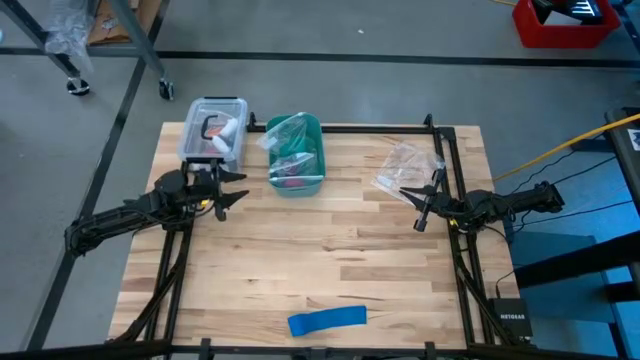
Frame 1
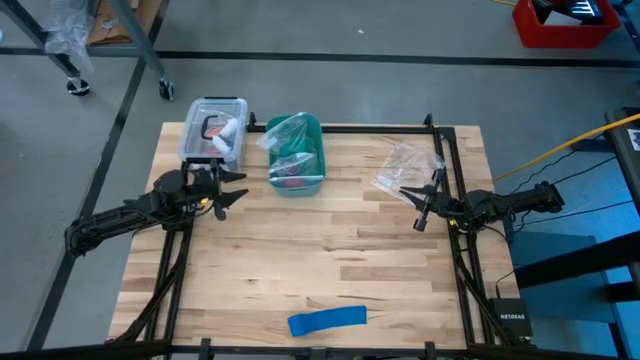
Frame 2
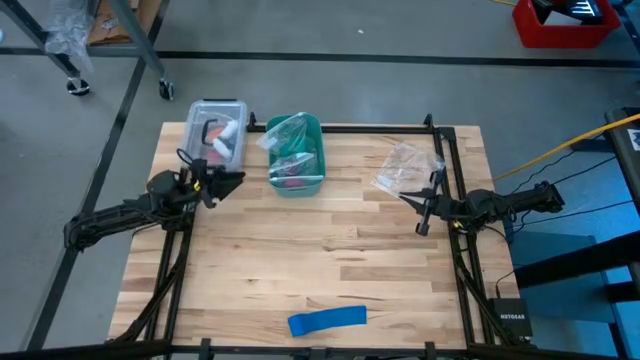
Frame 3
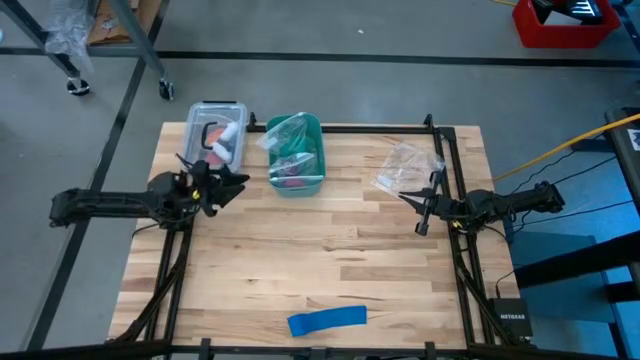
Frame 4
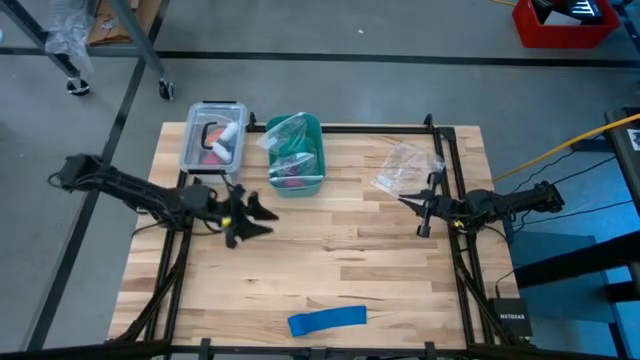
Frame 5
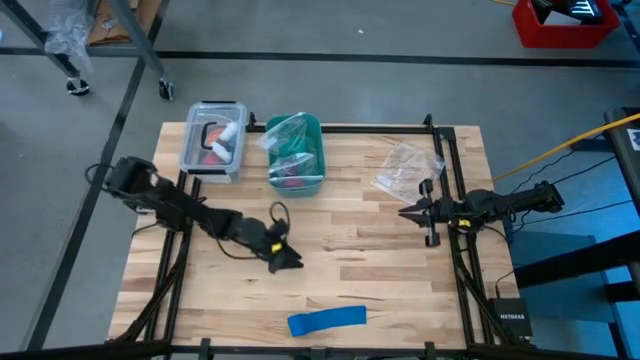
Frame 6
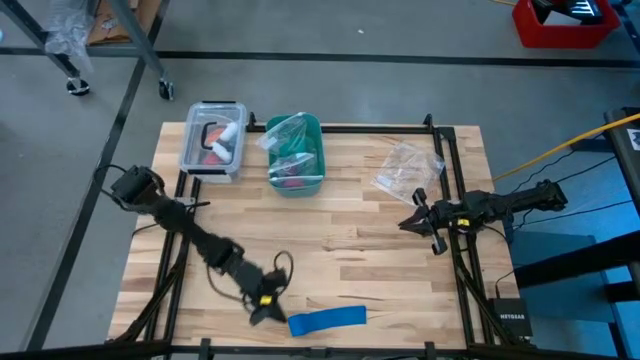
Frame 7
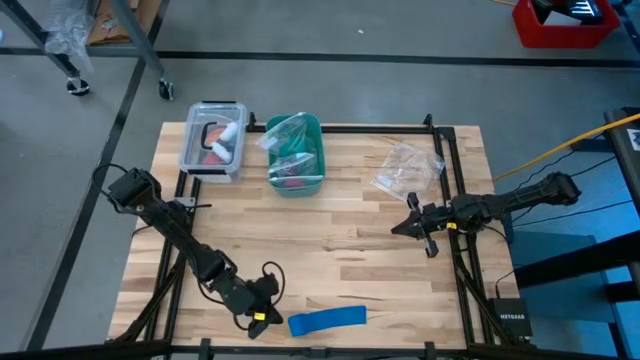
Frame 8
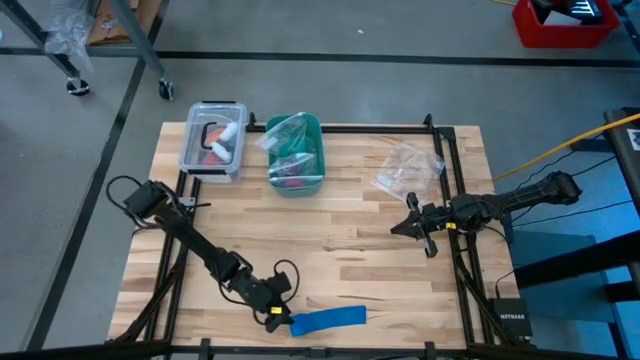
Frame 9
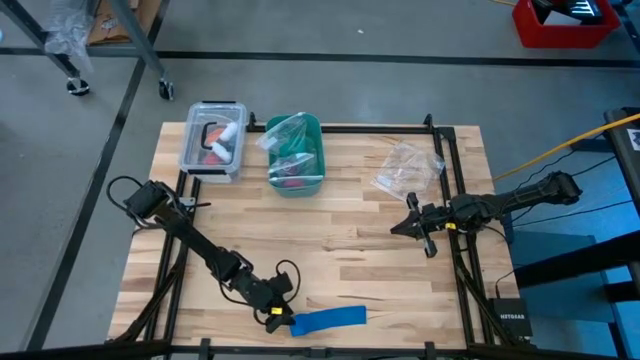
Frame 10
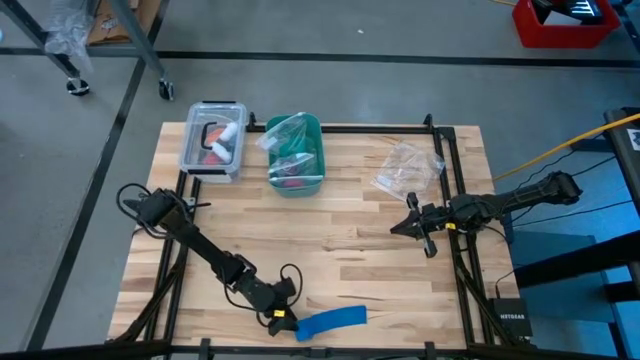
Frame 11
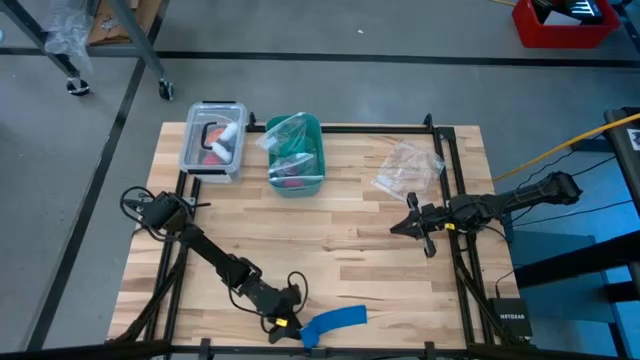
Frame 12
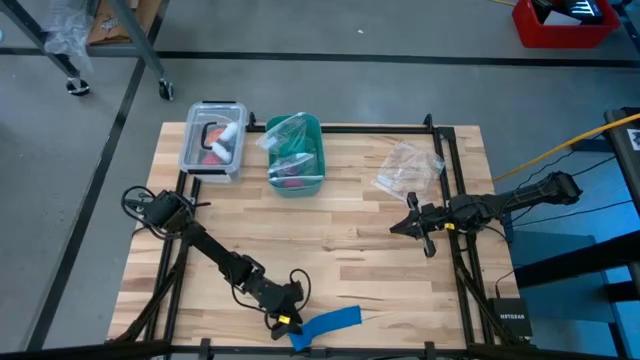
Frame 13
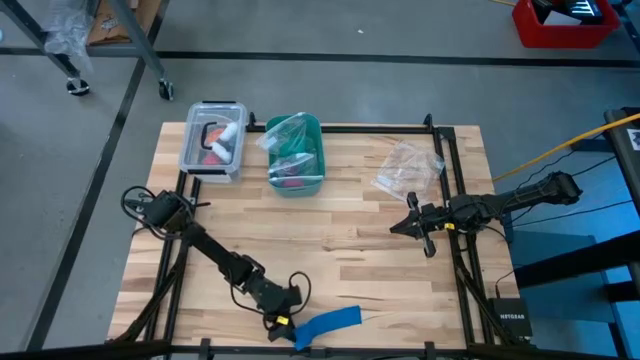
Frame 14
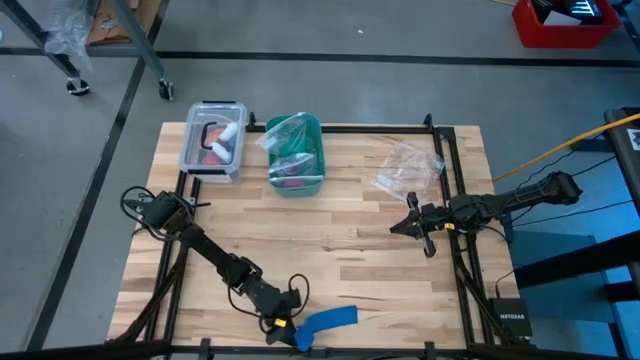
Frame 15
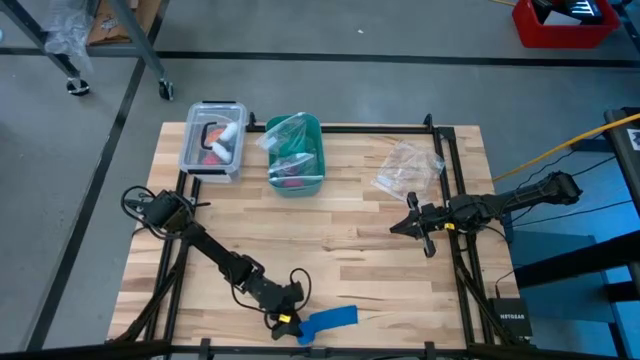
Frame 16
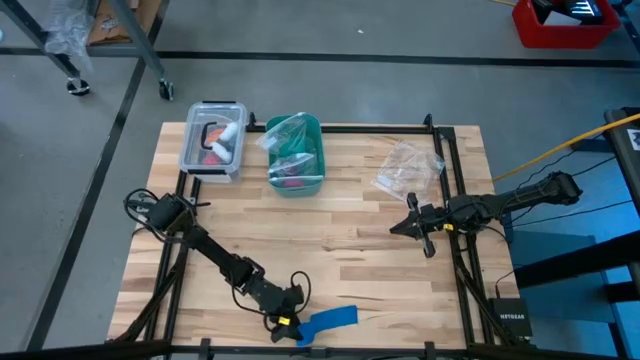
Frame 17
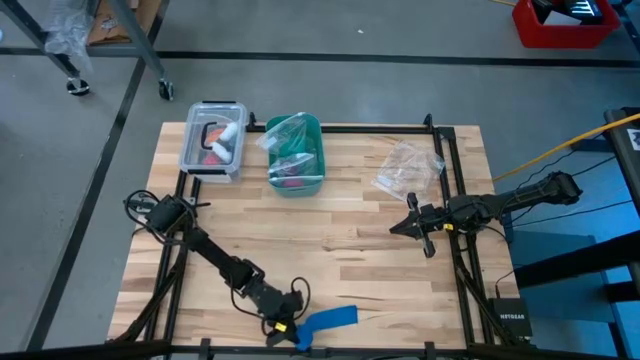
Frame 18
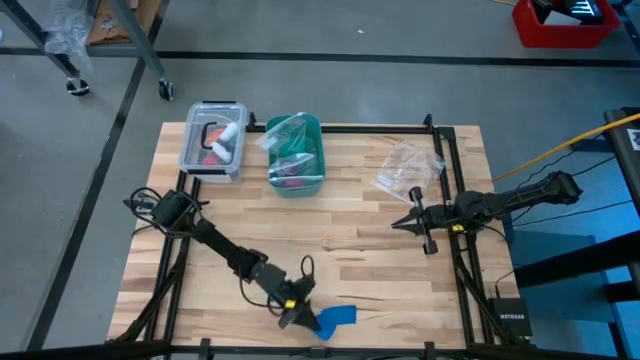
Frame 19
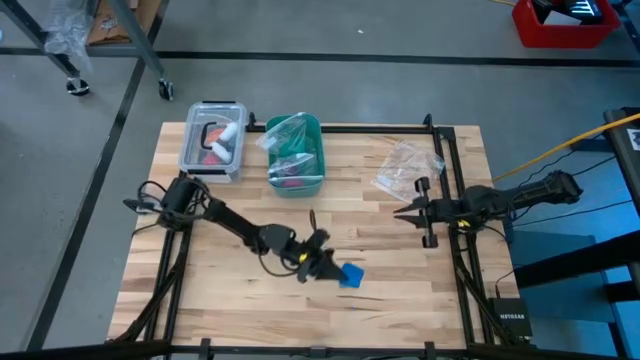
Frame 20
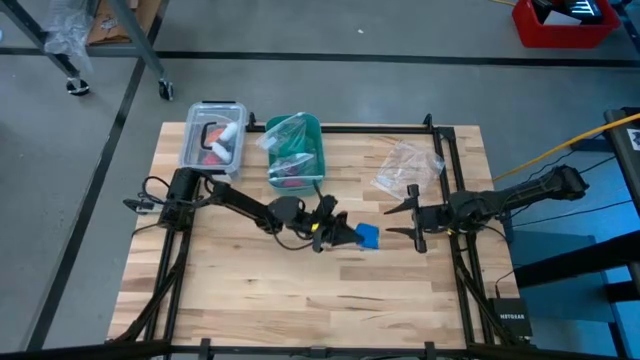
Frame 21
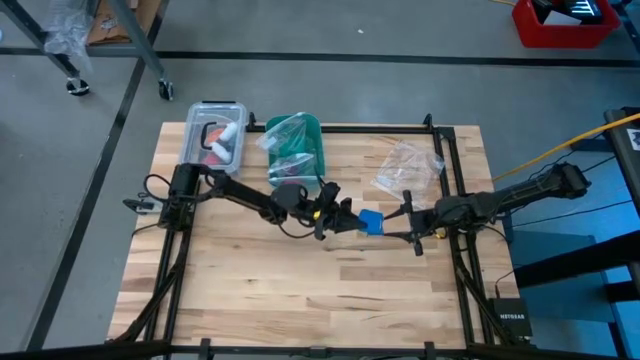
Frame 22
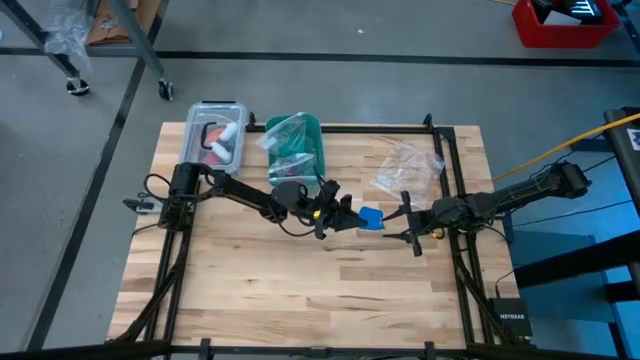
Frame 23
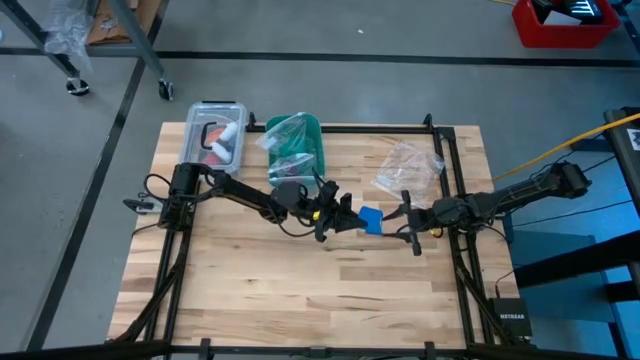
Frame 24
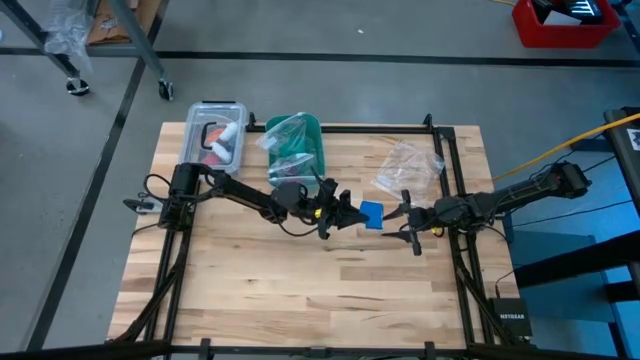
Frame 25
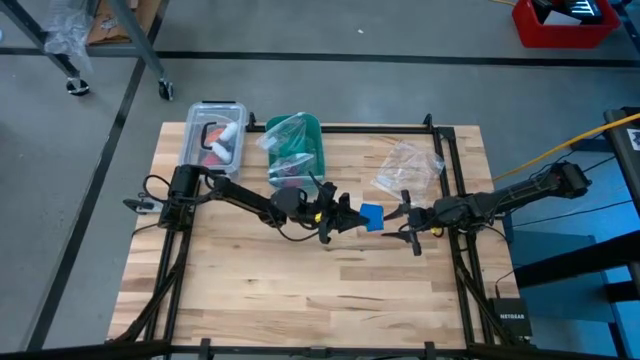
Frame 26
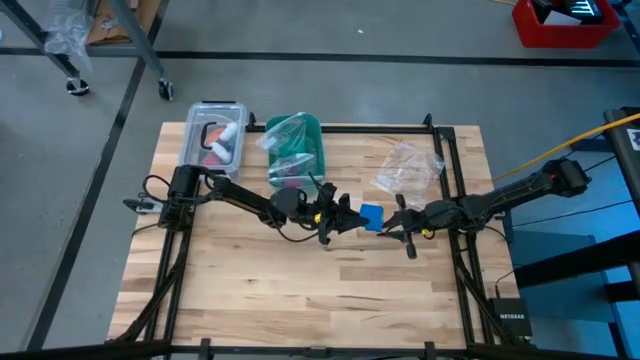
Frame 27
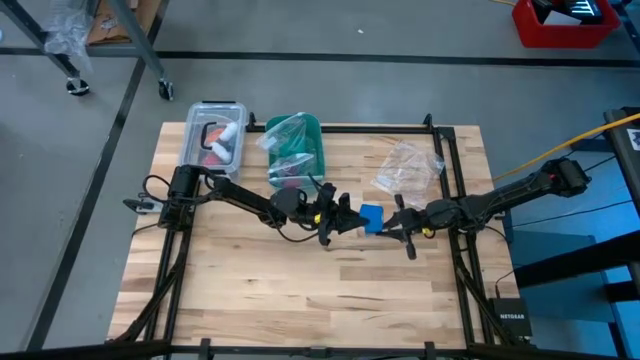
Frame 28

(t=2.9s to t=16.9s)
Task: Roll bandage
Roll the blue bandage
